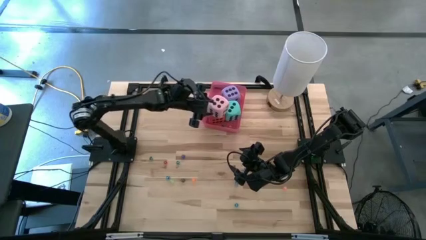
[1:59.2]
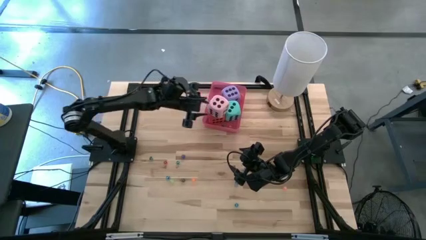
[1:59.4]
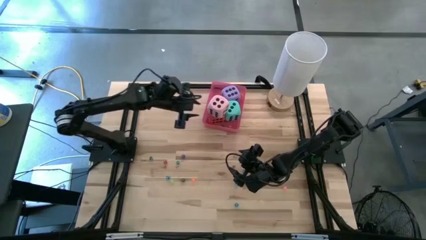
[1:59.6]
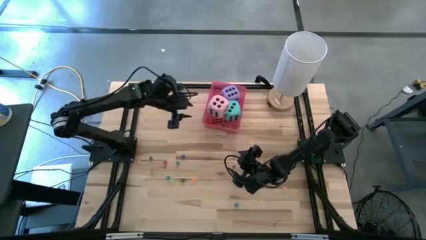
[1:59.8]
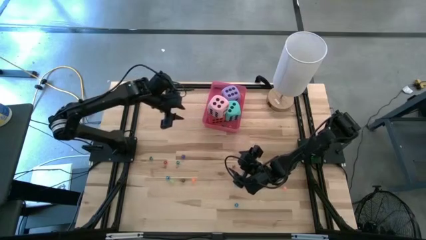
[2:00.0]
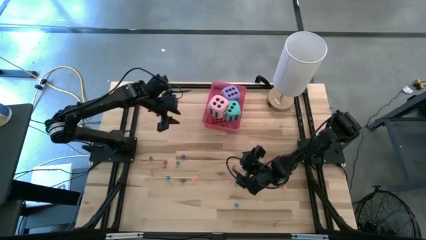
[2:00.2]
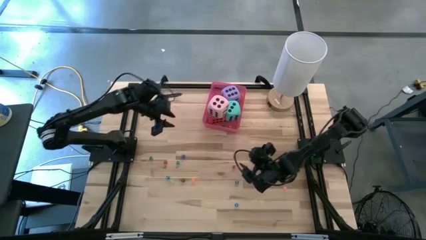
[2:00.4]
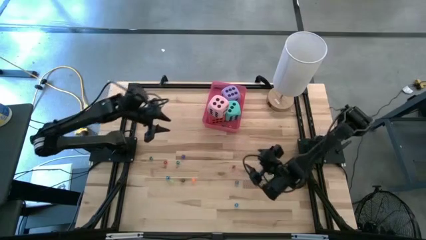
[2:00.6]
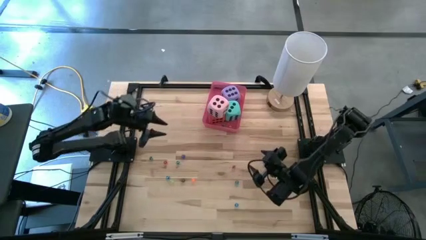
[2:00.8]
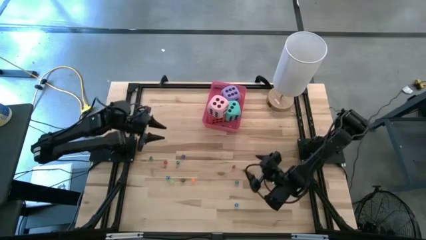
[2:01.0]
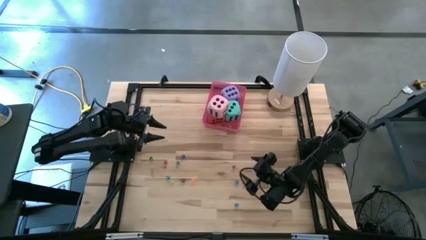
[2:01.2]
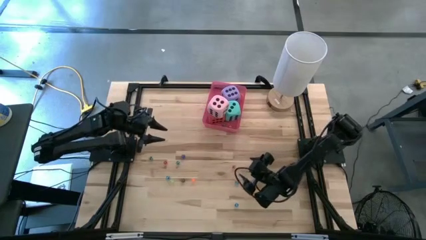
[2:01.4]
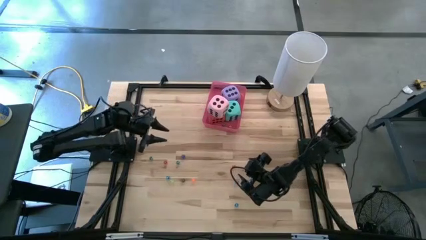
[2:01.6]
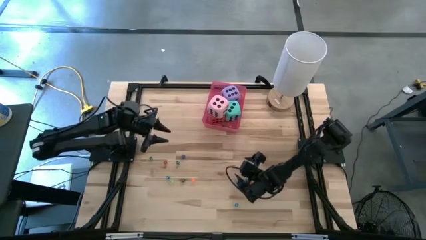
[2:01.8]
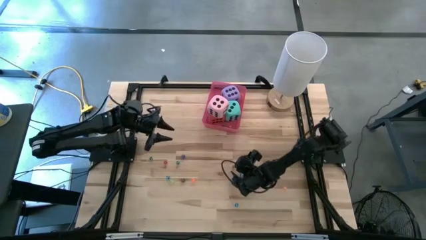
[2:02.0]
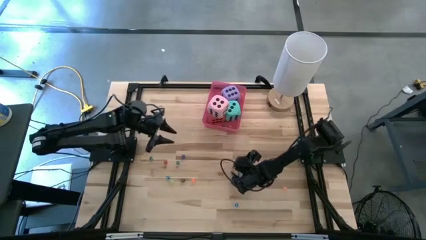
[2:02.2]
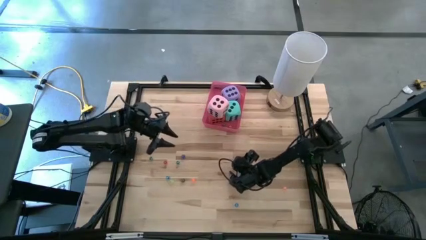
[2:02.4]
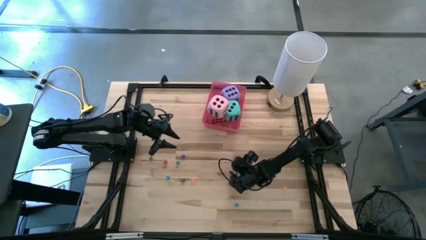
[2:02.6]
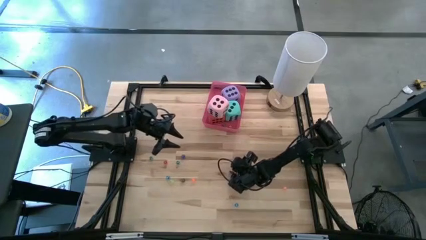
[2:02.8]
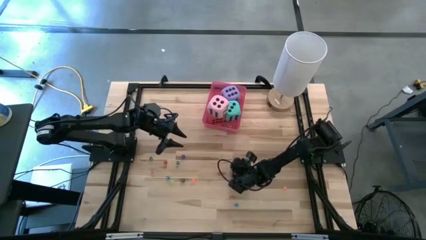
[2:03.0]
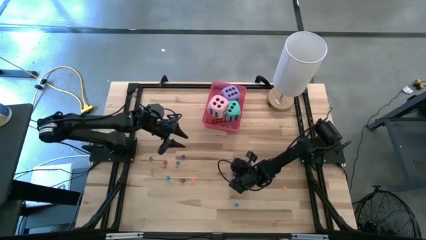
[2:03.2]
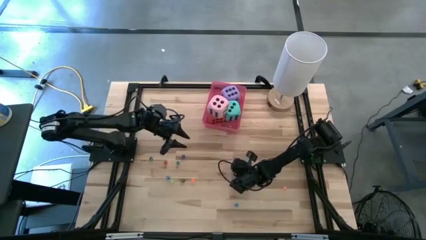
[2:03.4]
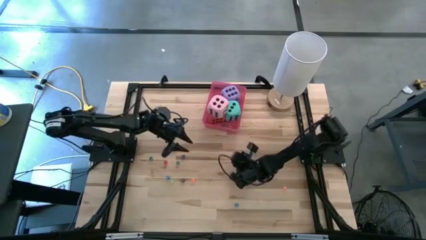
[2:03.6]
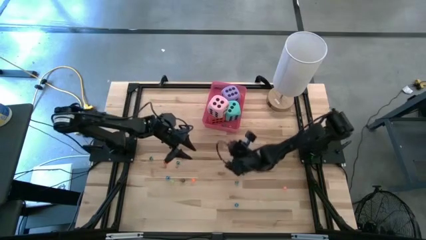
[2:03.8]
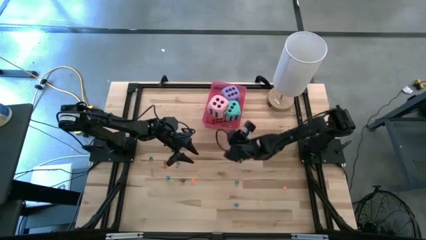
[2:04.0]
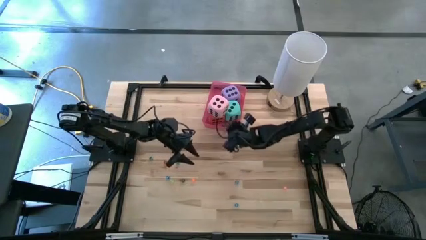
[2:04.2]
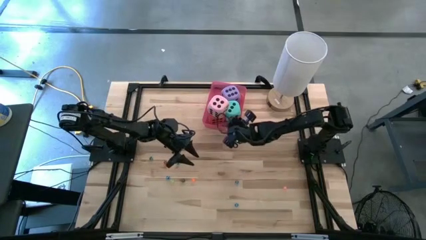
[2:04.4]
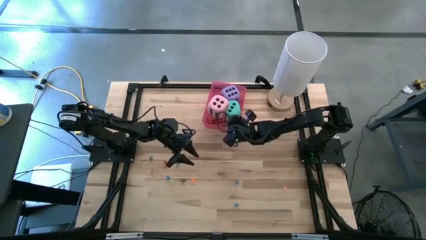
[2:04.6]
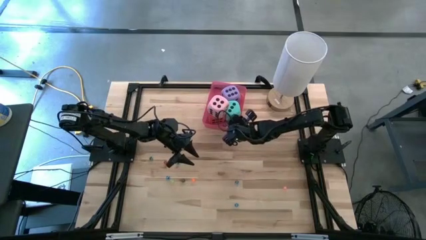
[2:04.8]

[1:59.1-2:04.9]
Task: Pick & Place Dice
Put the left small red dice into the bin

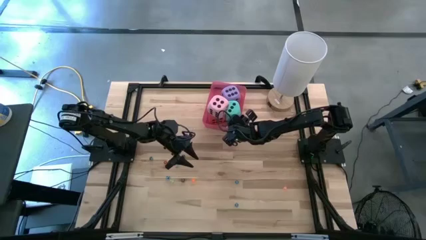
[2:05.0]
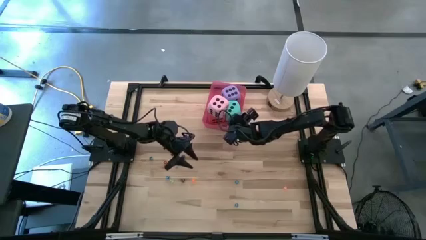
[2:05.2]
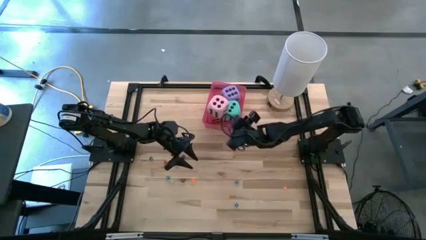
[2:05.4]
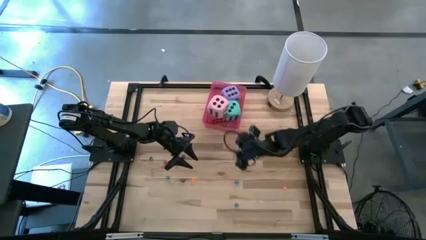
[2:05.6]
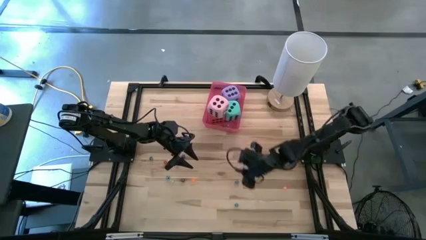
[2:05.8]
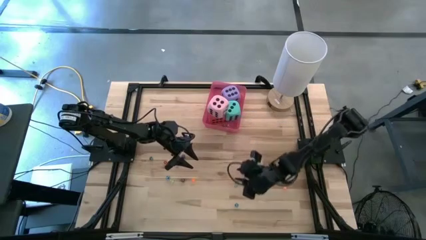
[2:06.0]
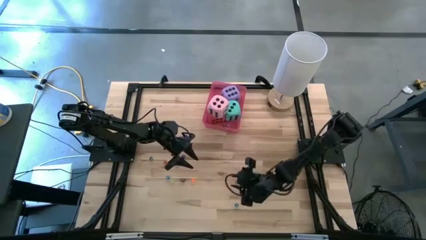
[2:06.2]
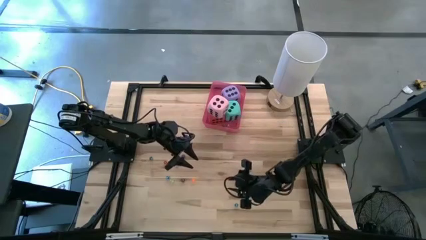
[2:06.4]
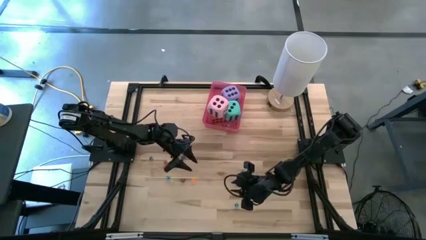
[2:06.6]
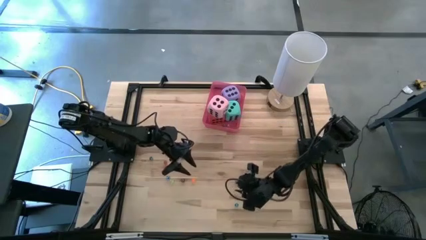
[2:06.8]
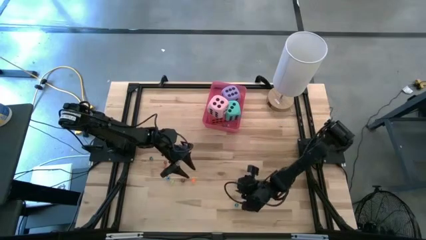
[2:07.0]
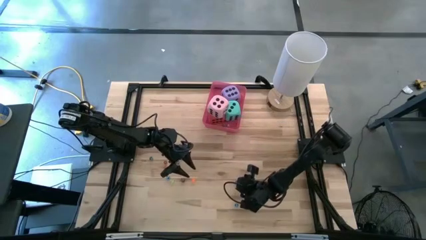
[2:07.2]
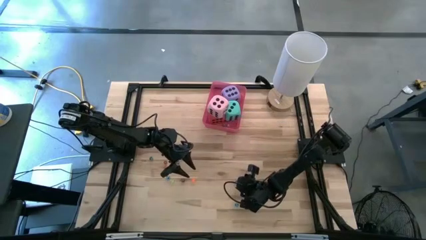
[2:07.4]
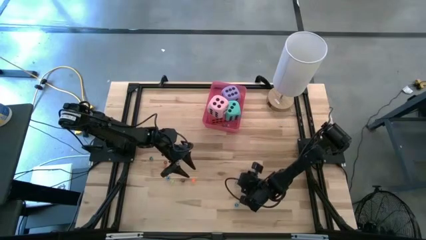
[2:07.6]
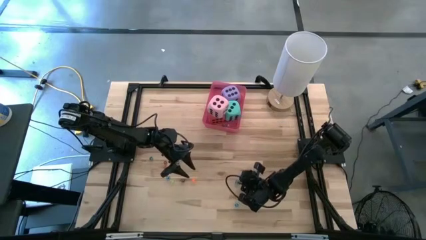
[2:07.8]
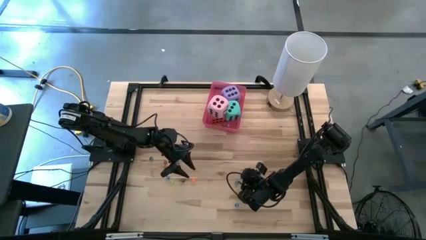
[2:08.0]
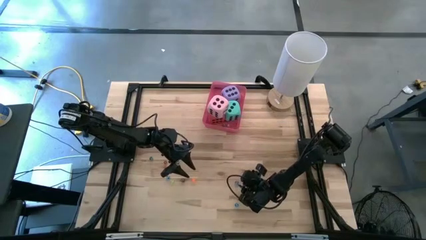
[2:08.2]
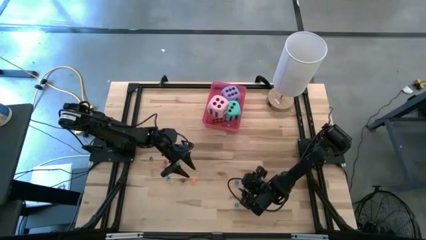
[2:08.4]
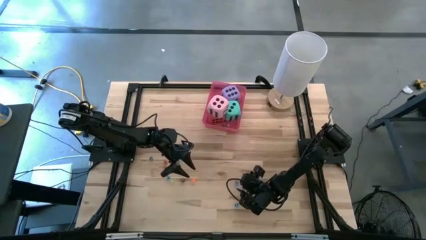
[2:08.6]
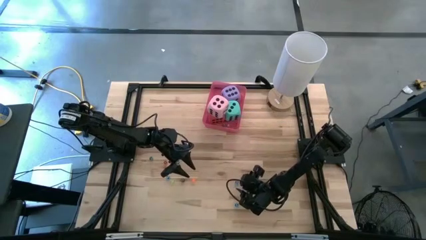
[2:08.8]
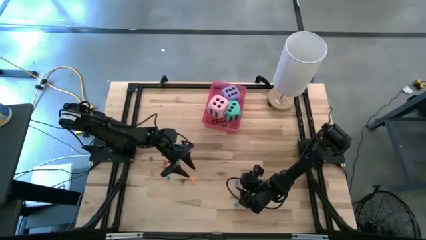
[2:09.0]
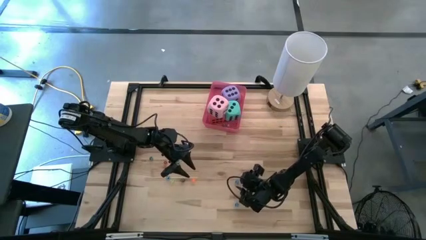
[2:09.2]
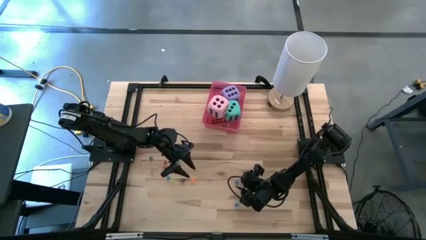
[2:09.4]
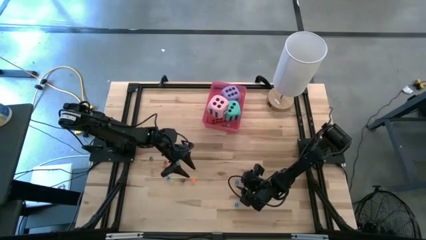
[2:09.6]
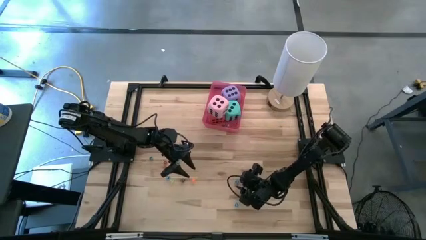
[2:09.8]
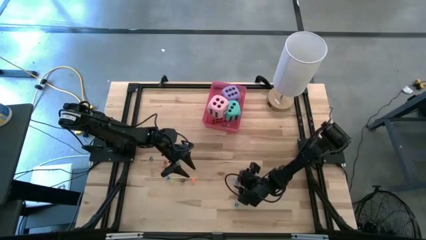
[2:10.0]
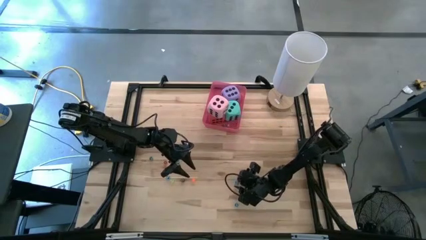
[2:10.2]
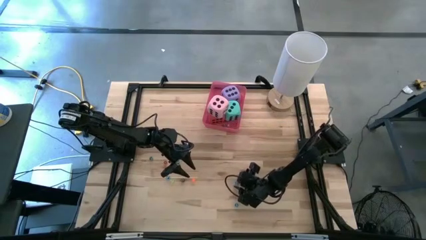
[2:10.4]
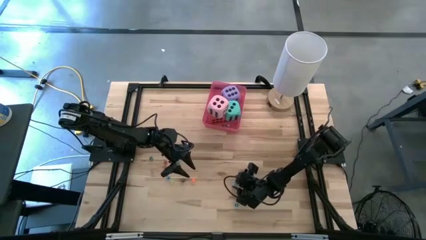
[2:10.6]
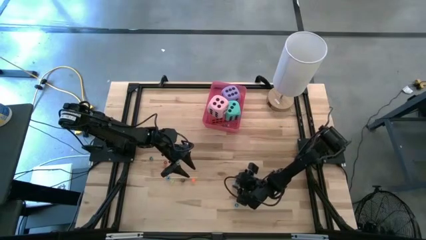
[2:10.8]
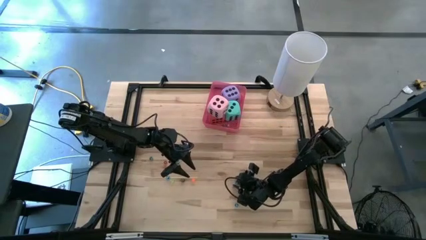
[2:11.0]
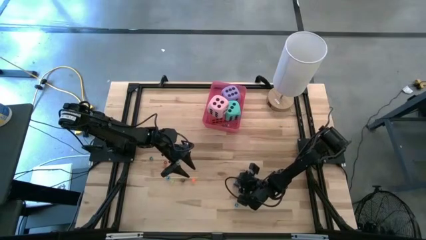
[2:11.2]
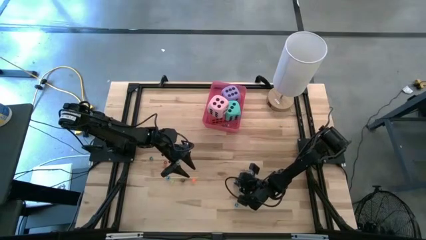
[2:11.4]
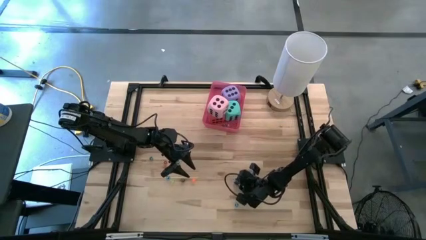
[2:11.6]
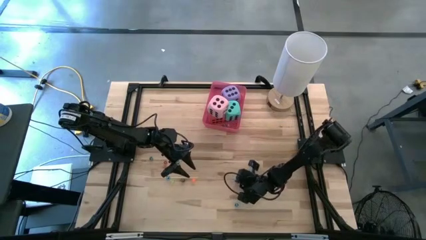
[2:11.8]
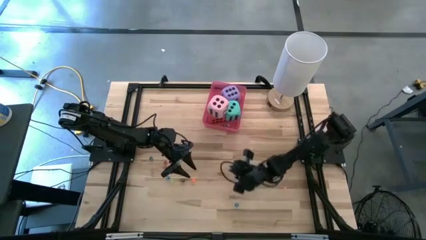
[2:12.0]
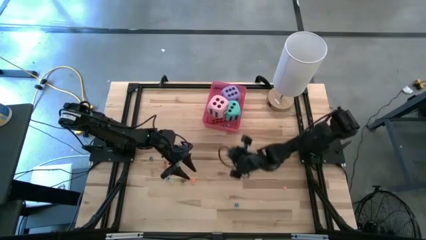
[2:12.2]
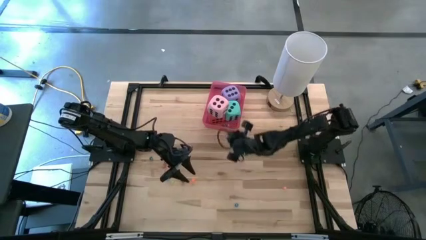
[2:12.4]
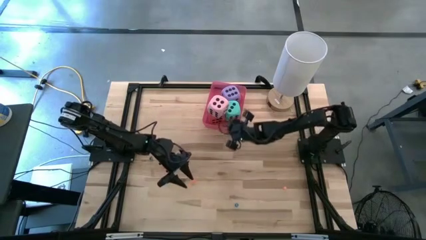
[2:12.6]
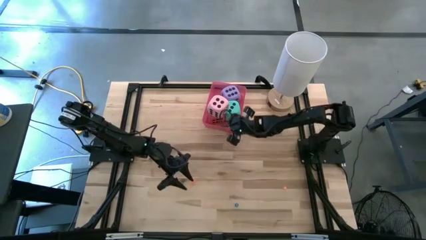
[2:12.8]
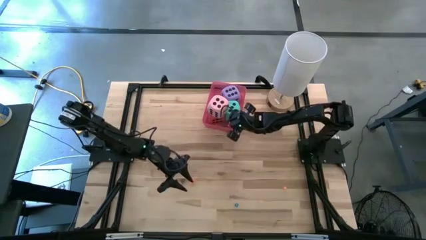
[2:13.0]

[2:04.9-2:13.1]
Put the top right small blue dice into the bin

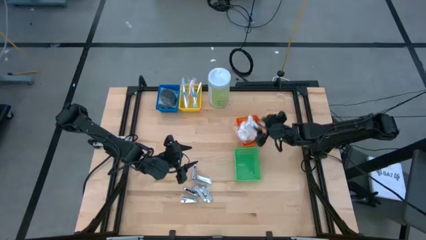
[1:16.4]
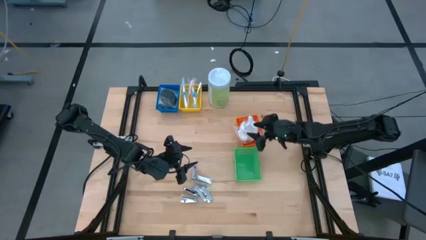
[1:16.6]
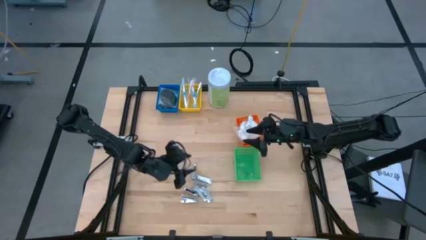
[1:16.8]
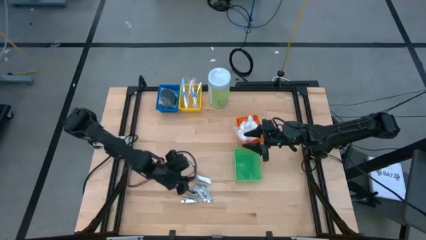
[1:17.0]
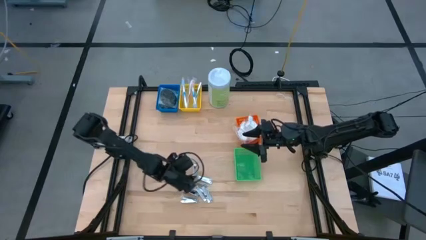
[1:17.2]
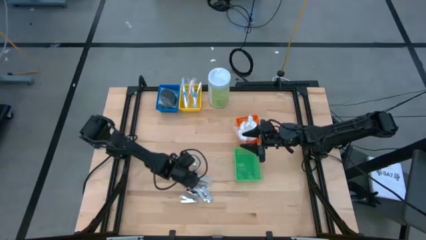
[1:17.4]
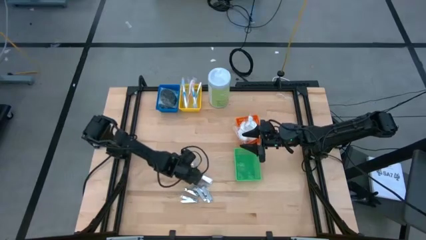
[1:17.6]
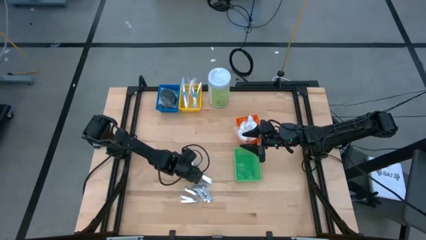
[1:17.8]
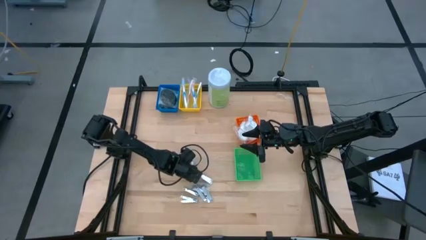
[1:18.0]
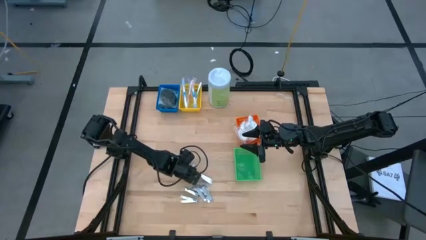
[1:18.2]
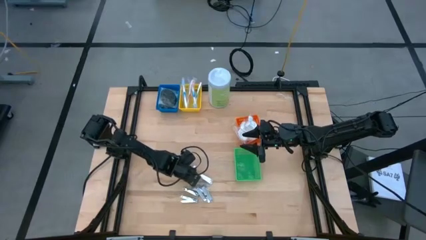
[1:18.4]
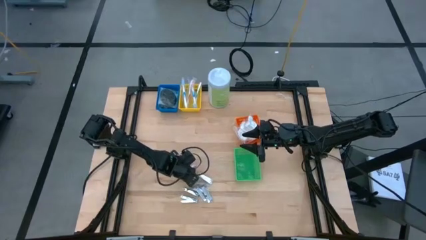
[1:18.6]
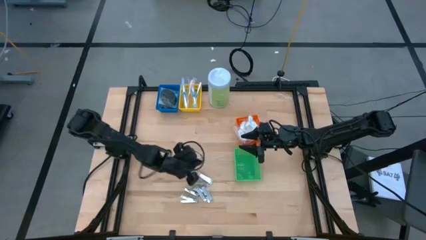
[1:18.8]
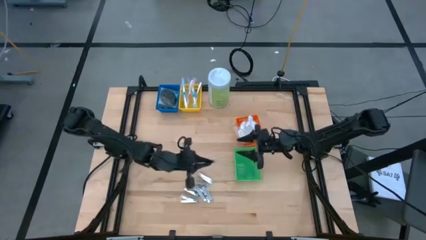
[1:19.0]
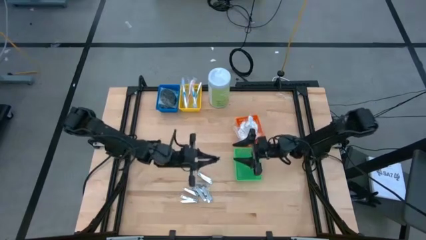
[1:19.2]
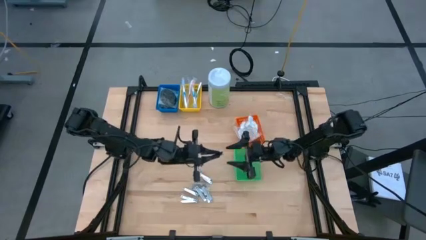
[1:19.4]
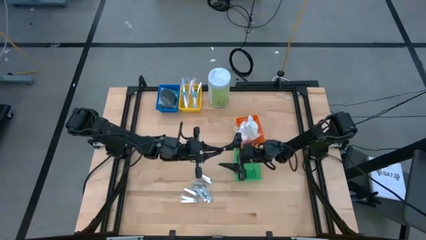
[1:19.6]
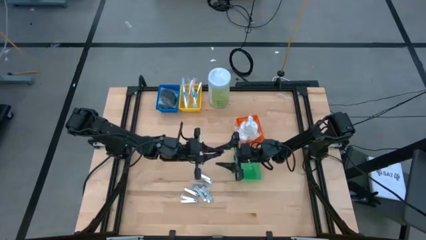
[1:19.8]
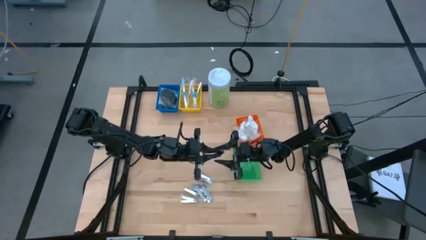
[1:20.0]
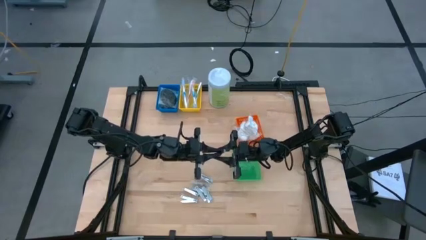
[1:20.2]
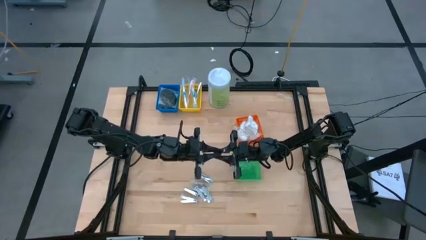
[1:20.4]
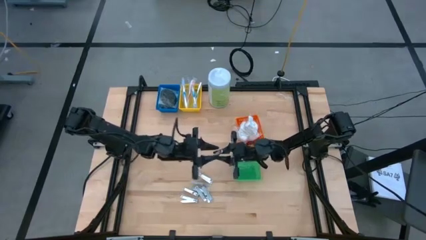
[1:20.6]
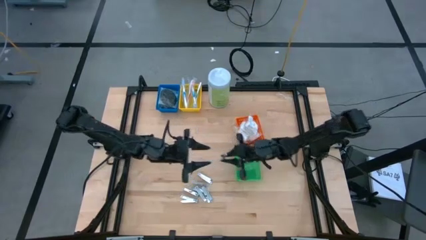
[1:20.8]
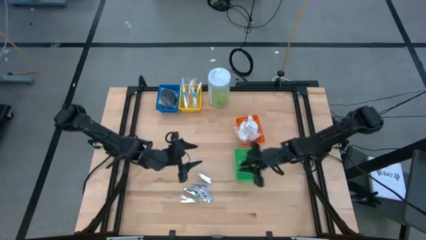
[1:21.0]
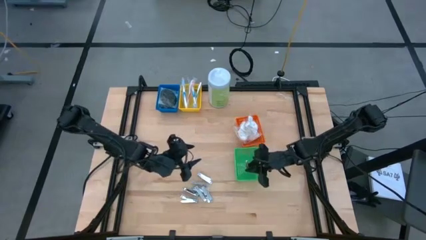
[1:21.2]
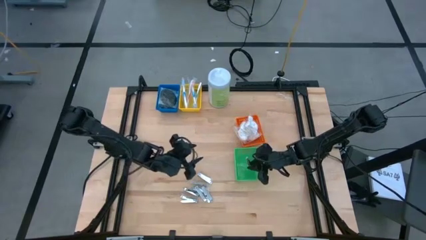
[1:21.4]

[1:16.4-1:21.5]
Task: Pick & Place Travel size toiletries
Put the nail cutter into the green bin
